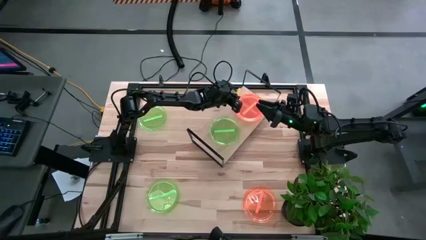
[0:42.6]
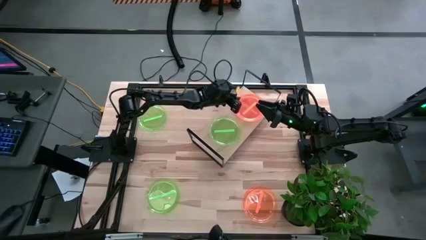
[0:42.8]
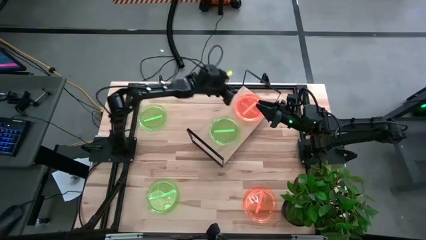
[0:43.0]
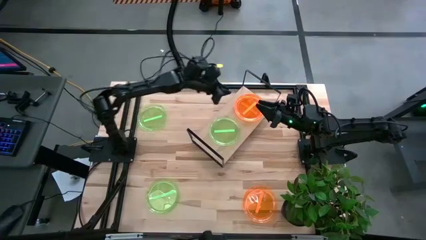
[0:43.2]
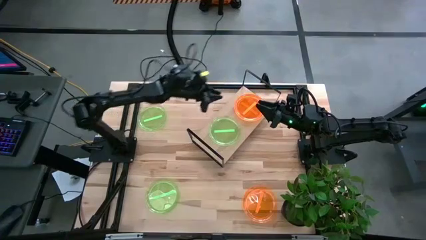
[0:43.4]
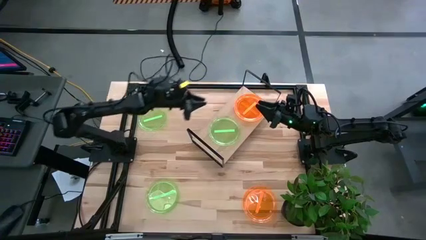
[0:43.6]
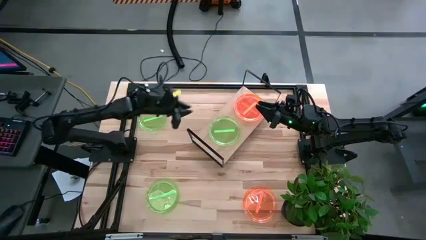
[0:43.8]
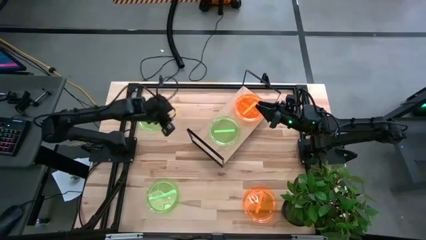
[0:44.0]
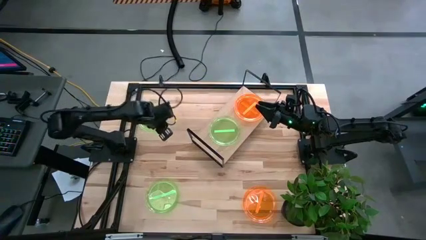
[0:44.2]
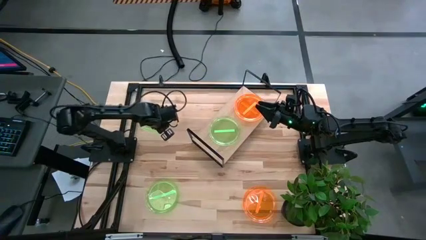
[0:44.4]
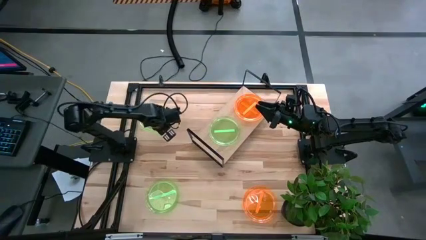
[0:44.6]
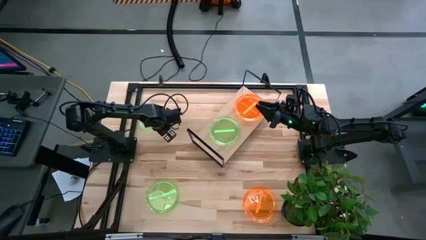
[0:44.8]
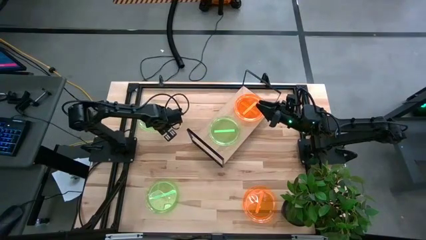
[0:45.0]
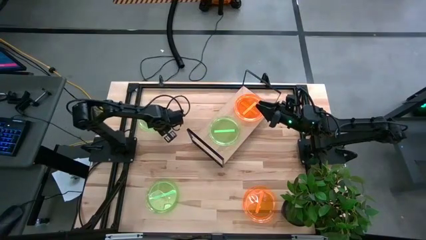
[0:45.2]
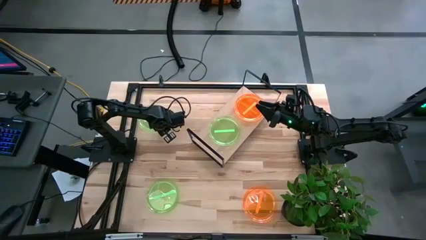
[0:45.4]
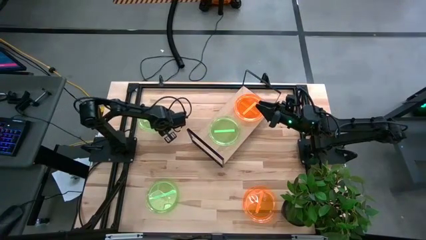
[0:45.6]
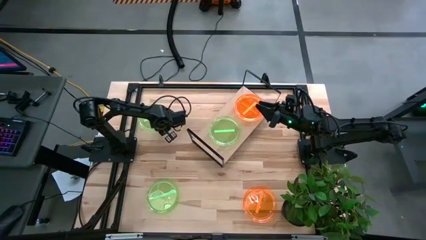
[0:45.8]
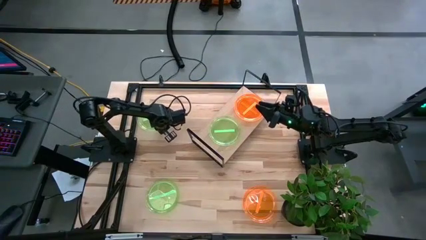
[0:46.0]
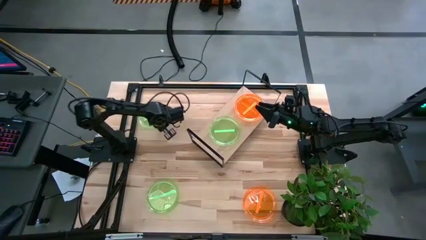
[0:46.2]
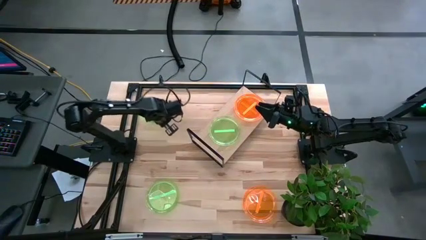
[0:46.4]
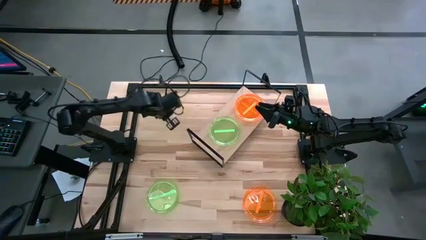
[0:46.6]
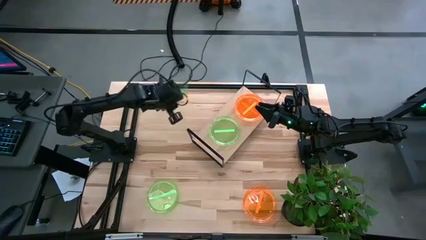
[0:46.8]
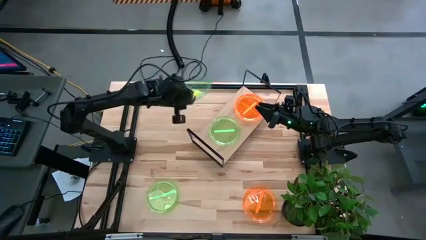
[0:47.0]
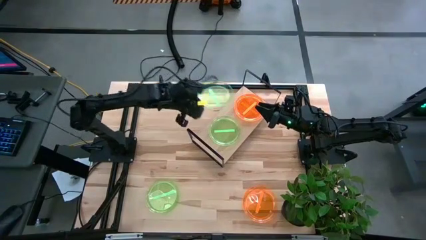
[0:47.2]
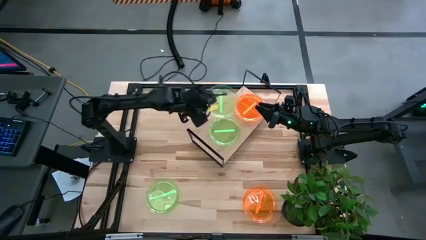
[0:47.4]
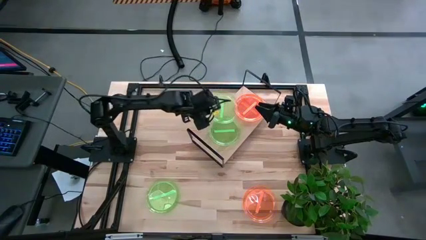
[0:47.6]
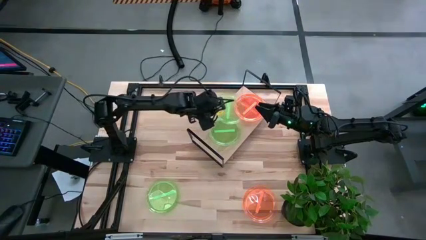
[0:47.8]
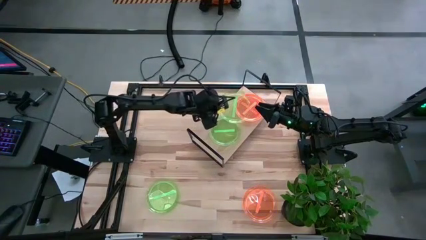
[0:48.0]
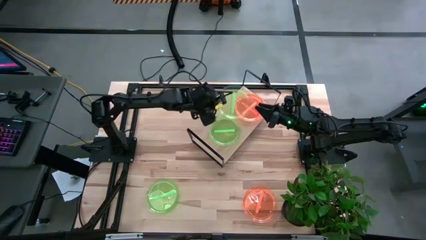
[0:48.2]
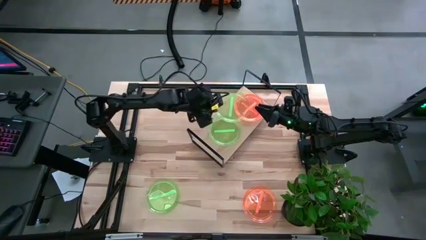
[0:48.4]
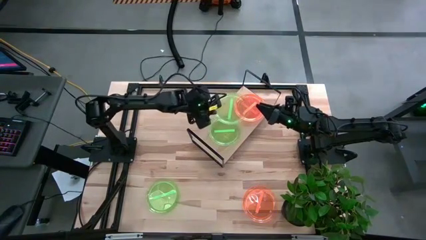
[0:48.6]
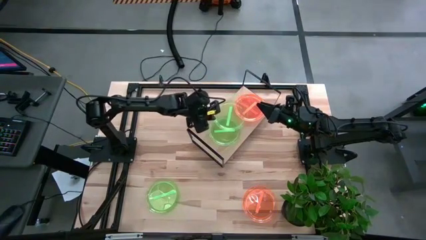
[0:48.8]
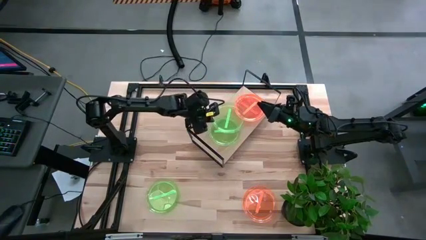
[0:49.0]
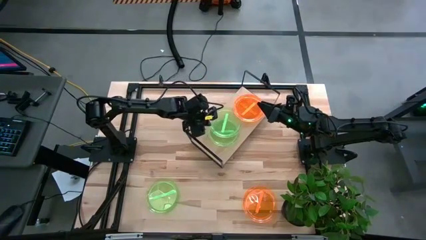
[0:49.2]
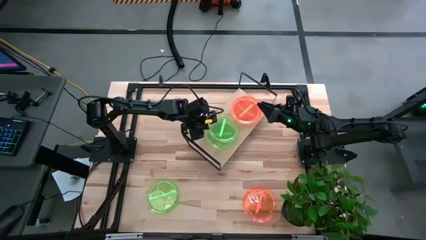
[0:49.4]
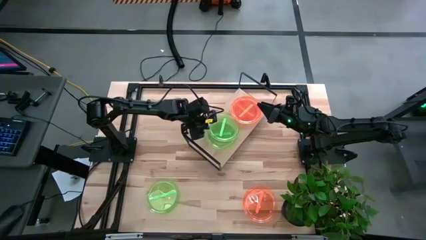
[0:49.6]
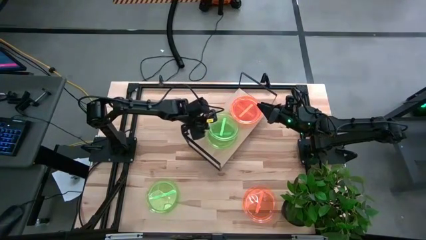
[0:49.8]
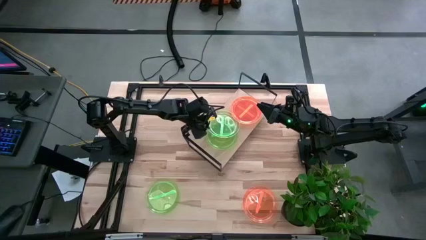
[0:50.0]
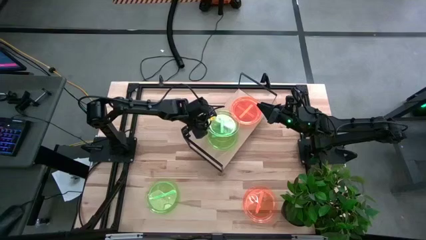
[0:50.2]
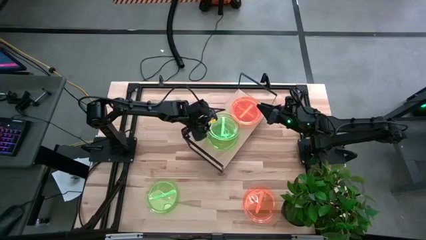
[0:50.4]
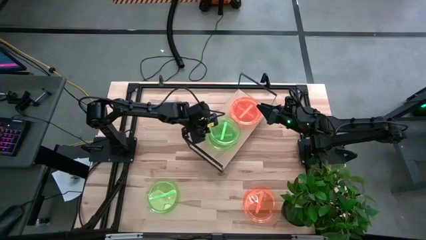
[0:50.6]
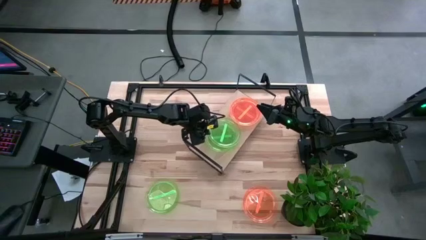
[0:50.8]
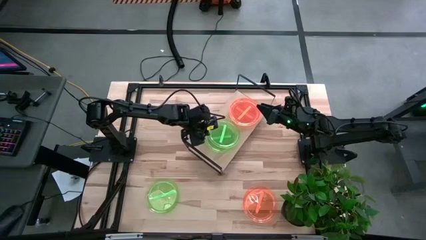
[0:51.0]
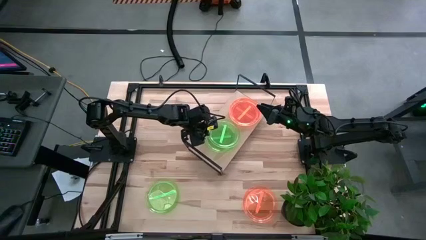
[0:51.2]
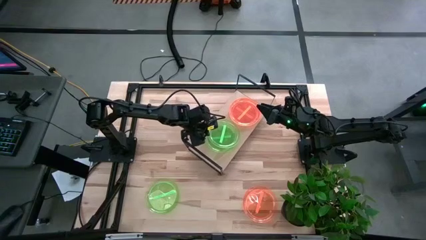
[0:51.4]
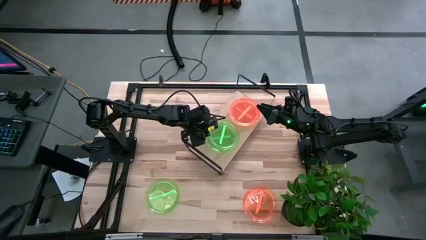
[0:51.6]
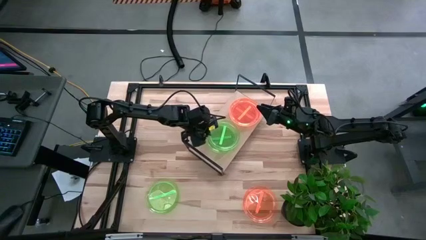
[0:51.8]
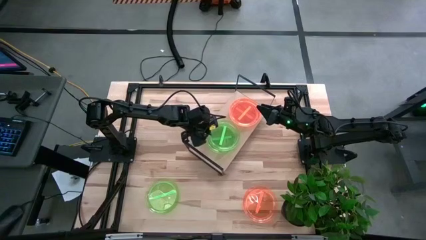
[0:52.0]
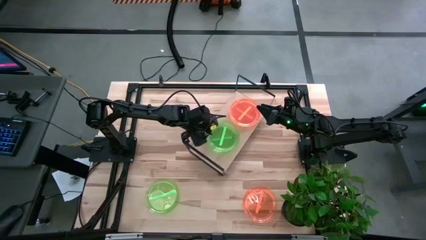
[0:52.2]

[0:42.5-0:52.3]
Task: Place and stack plates onto a shelf
Stack the top green plate on top of the green plate on the shelf

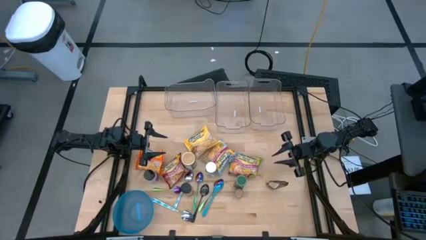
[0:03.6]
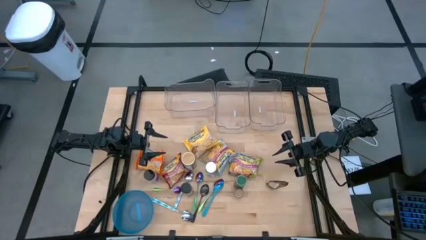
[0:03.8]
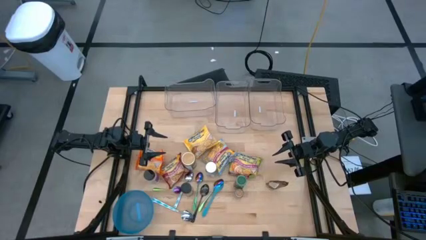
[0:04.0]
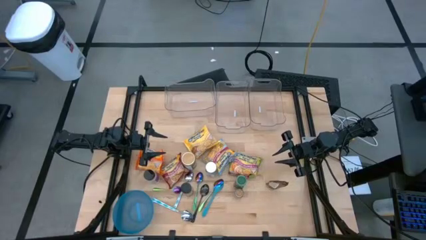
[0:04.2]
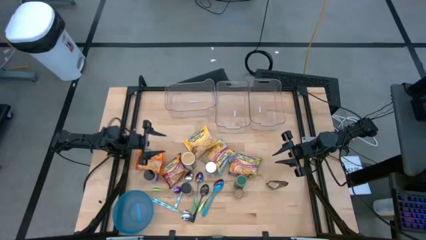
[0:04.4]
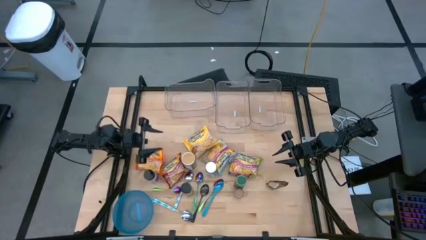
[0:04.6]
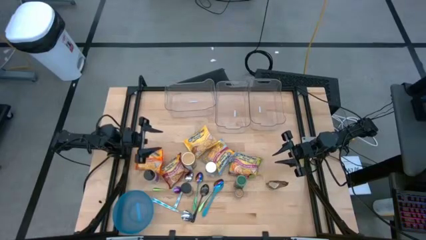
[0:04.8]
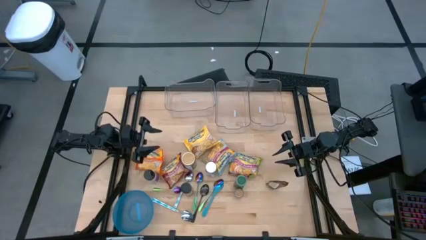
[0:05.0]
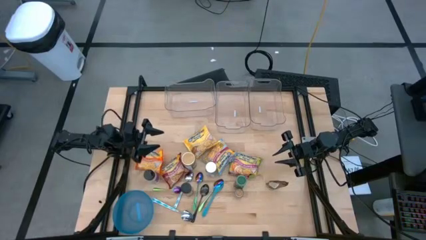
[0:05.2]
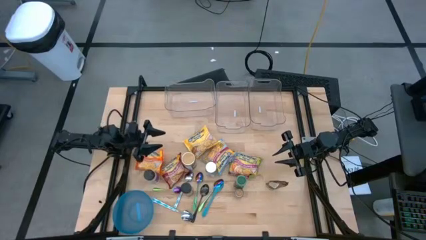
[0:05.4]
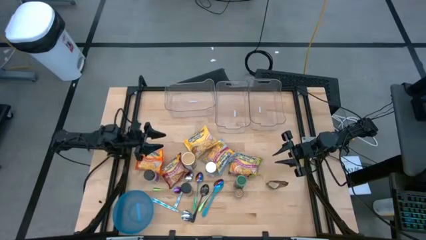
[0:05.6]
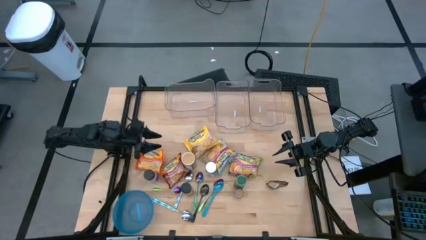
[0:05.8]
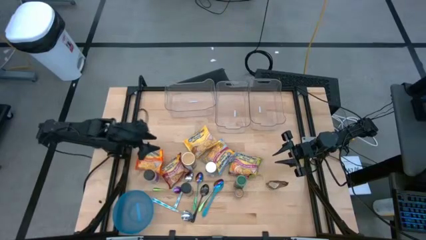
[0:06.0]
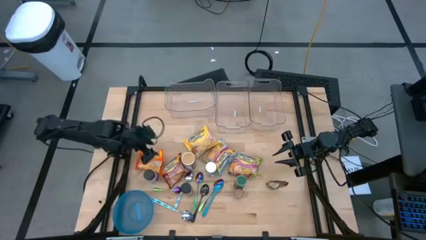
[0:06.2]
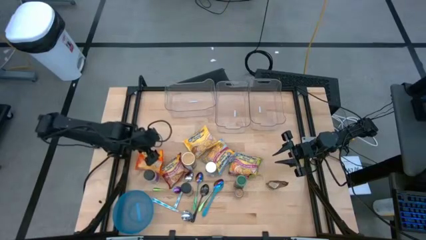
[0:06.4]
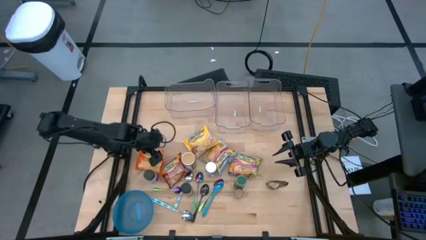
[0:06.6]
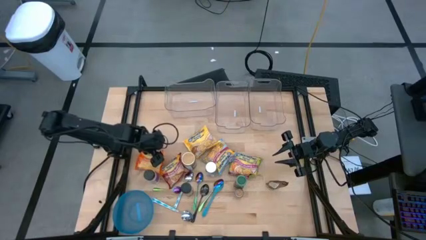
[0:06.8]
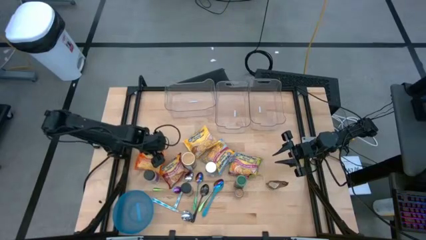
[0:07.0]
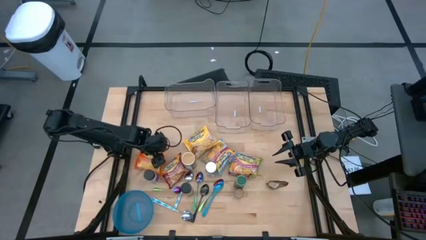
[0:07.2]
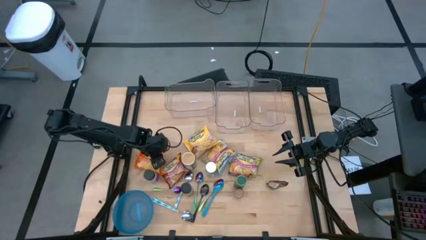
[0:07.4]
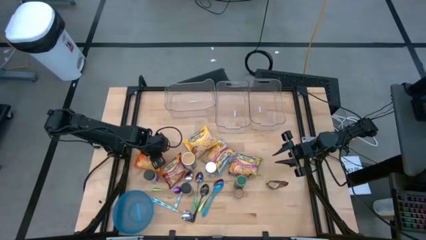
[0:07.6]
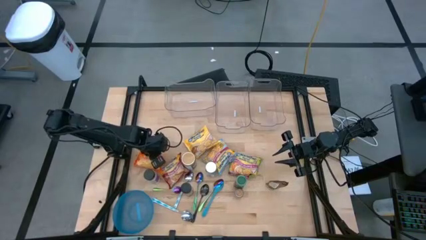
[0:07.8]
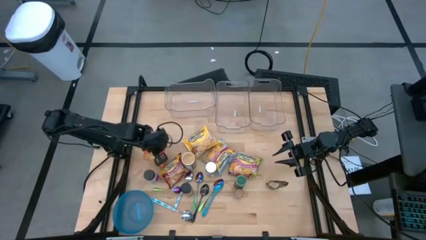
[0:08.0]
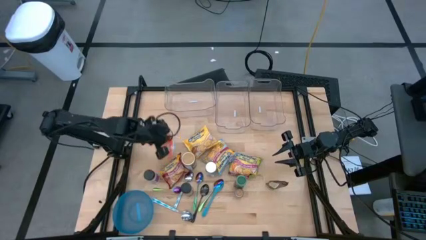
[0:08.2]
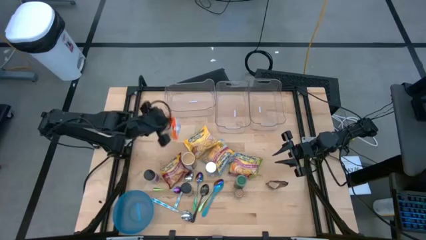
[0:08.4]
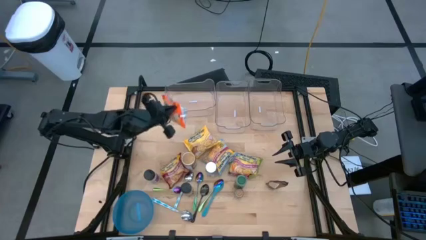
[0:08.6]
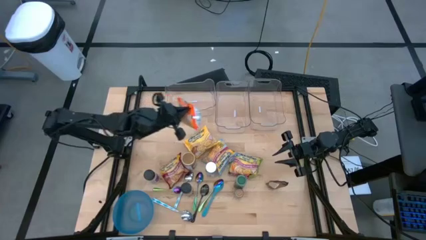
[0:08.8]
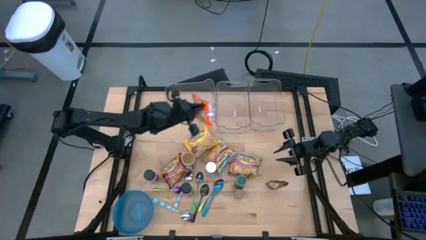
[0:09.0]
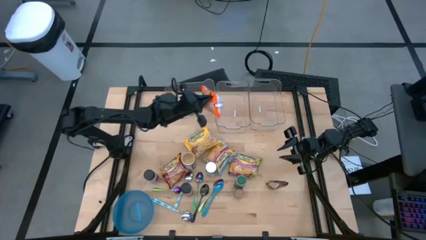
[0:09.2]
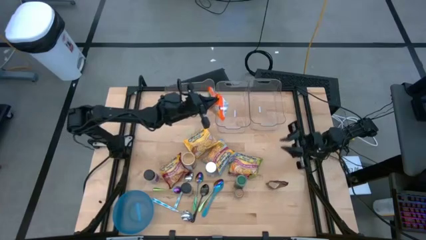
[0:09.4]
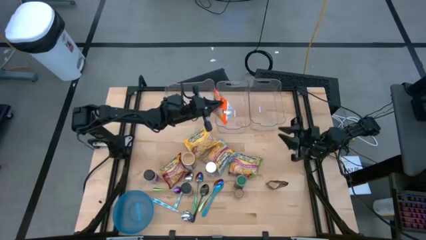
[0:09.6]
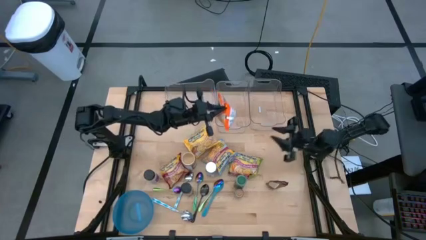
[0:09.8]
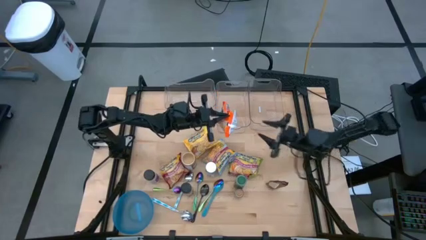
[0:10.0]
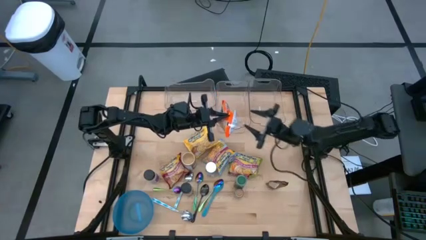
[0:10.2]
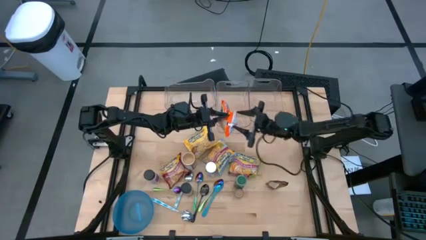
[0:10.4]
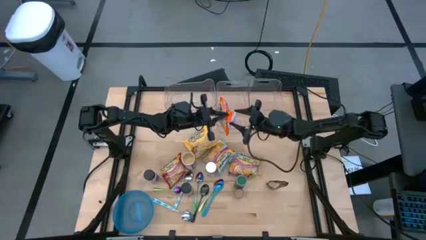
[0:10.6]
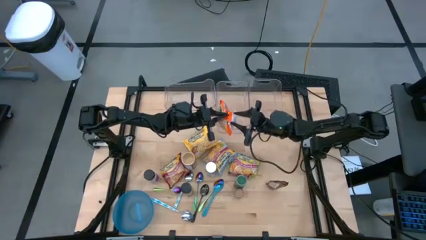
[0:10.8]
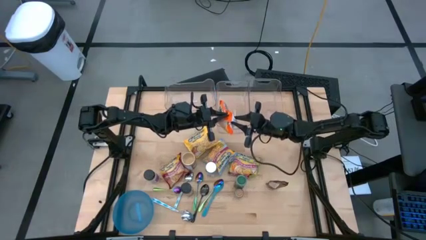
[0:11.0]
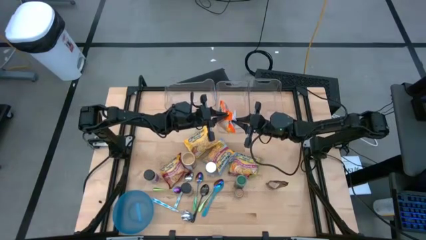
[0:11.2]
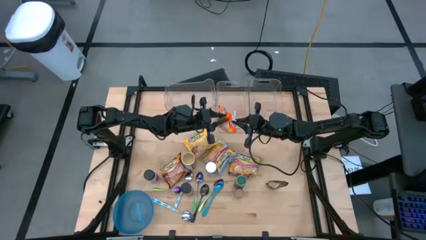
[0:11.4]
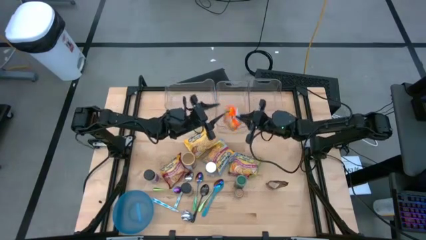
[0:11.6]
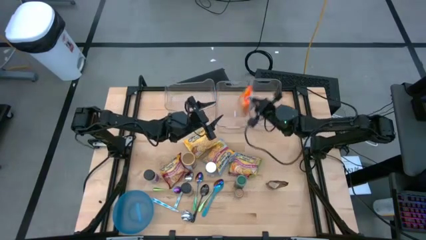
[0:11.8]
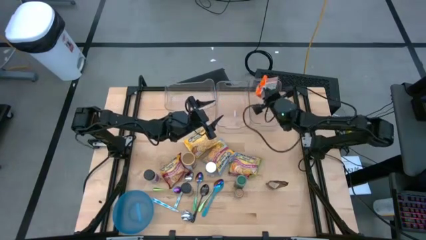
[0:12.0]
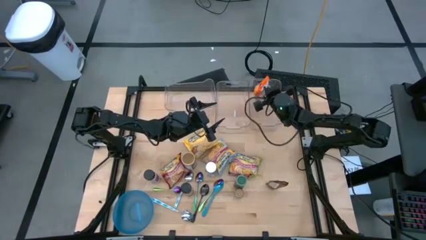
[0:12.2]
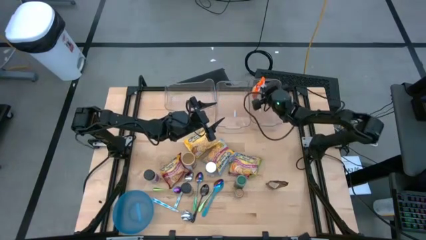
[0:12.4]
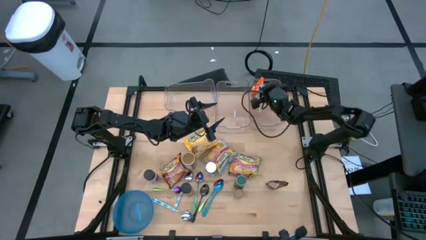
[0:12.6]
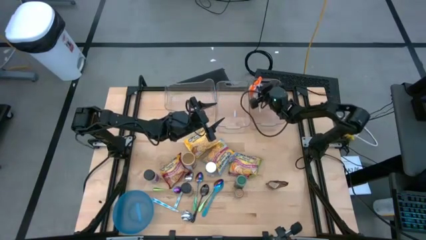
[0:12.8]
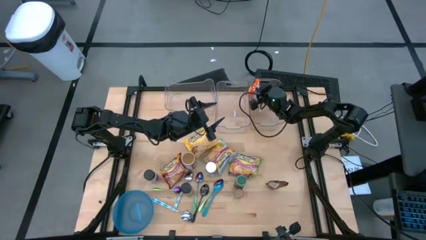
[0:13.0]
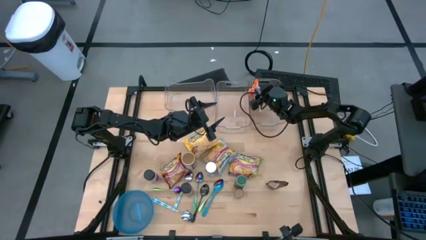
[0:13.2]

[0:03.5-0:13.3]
Task: Pick & Place Food Item
Put the orange noodle pack into the right transparent bin
